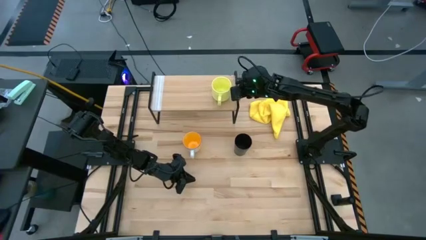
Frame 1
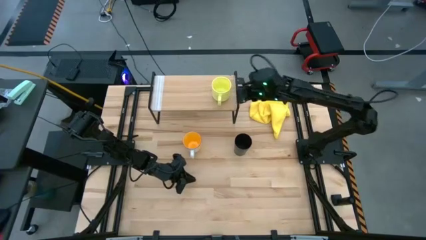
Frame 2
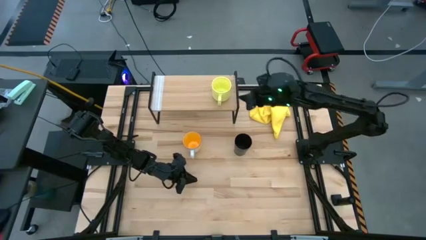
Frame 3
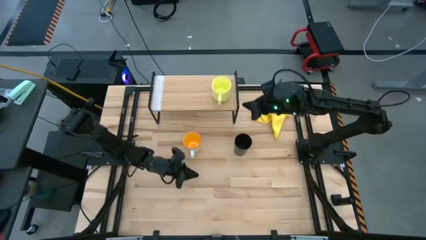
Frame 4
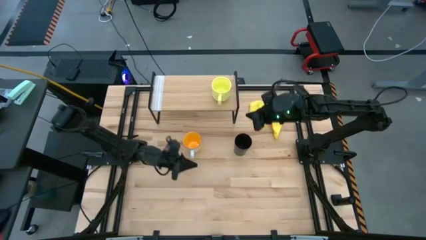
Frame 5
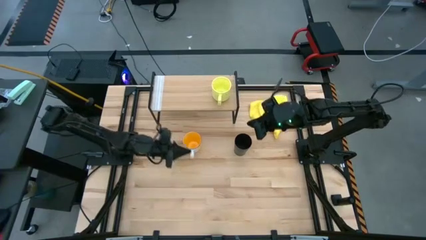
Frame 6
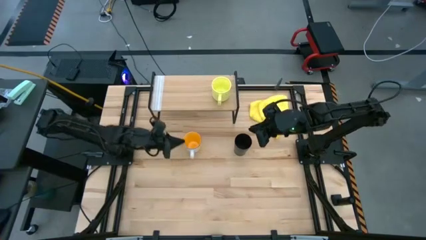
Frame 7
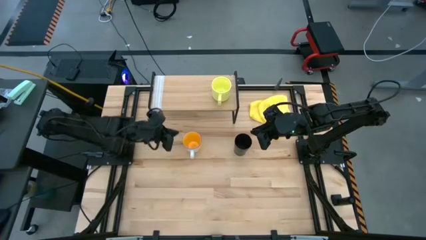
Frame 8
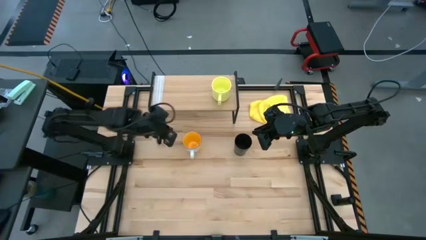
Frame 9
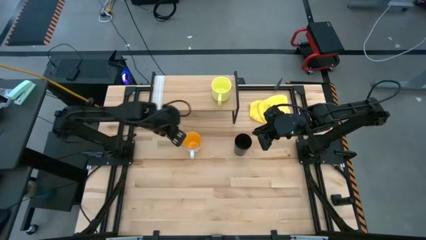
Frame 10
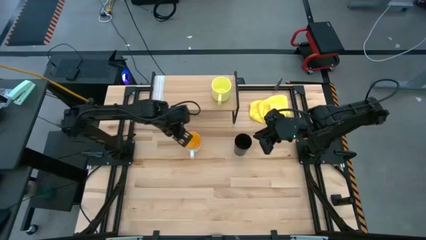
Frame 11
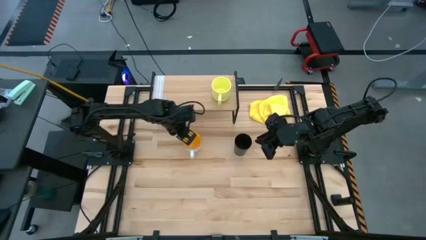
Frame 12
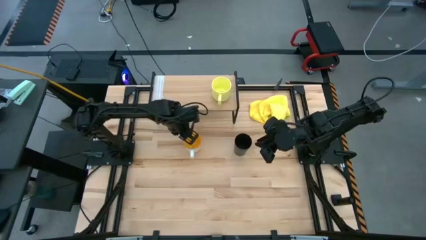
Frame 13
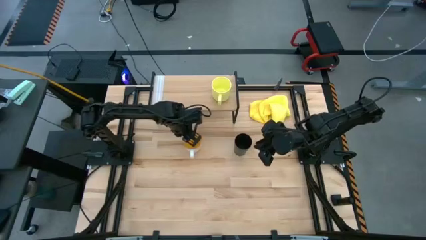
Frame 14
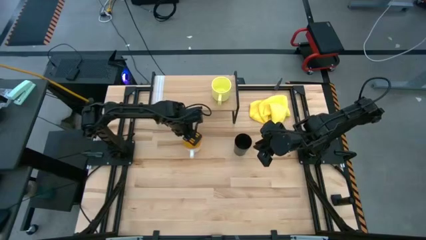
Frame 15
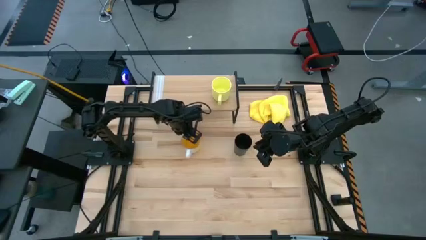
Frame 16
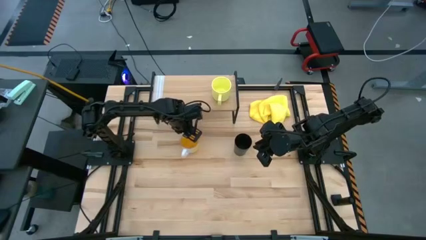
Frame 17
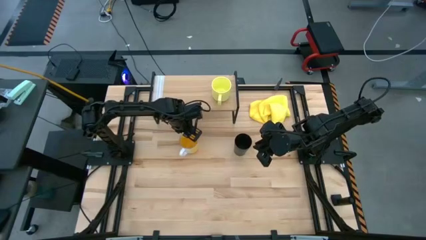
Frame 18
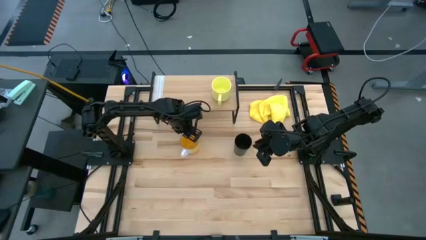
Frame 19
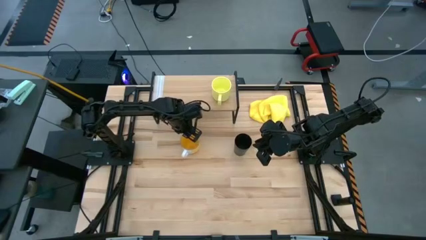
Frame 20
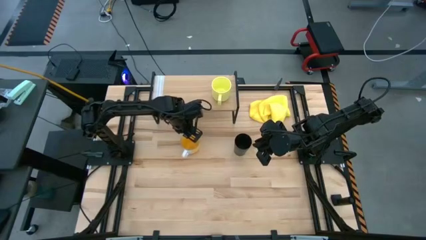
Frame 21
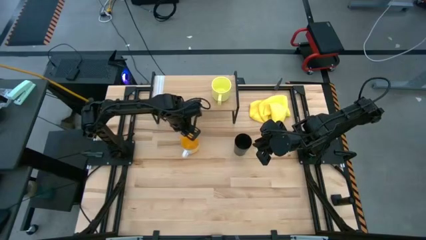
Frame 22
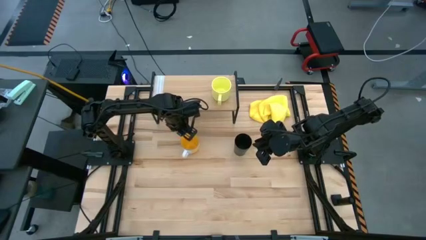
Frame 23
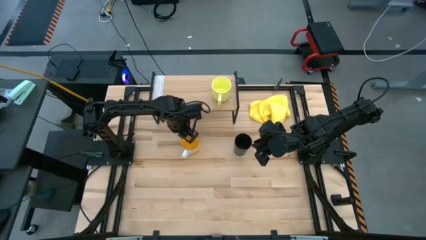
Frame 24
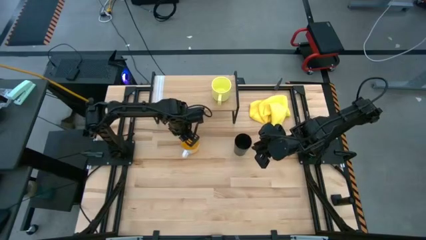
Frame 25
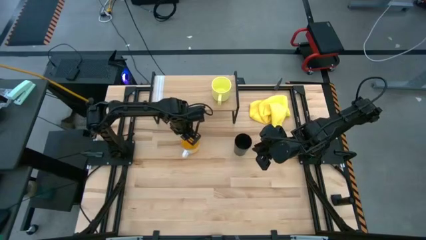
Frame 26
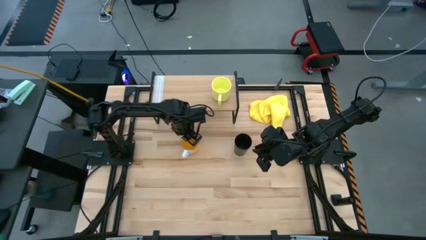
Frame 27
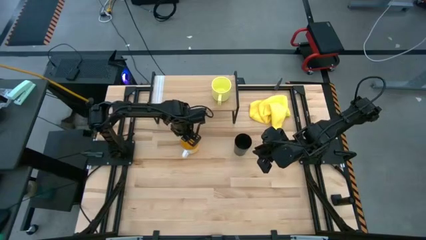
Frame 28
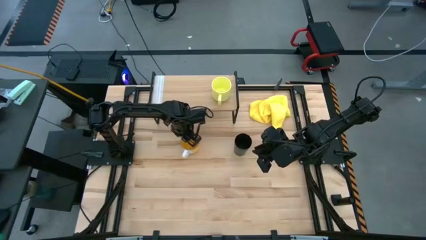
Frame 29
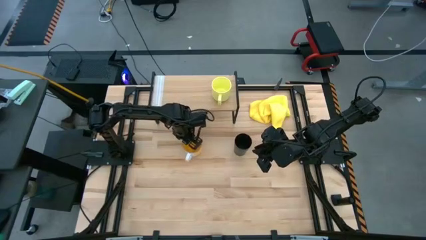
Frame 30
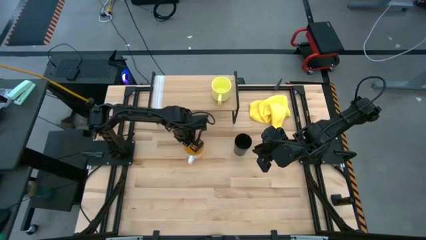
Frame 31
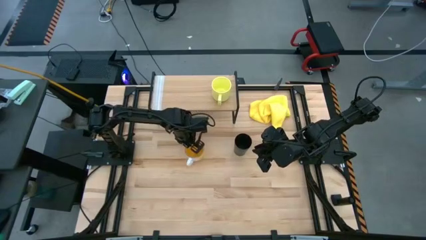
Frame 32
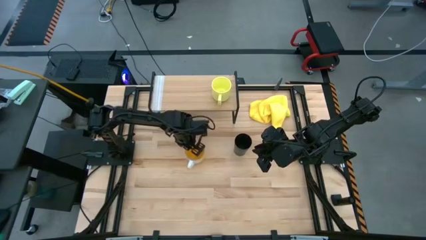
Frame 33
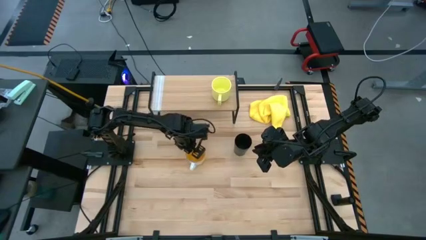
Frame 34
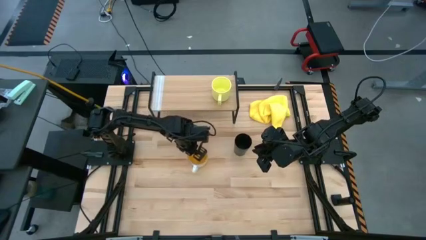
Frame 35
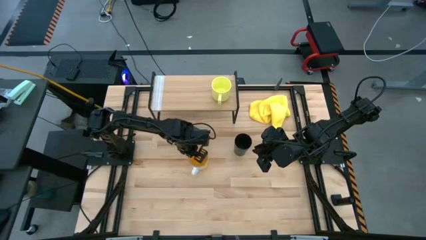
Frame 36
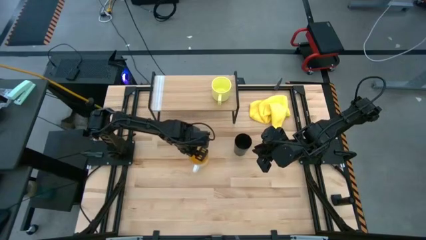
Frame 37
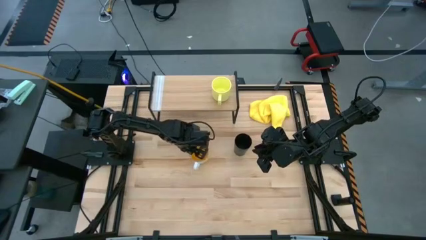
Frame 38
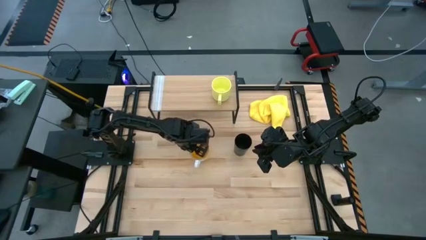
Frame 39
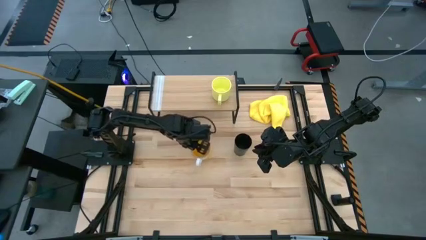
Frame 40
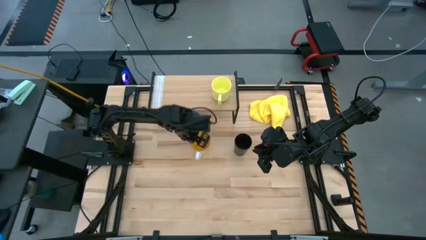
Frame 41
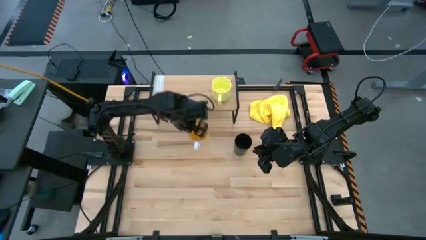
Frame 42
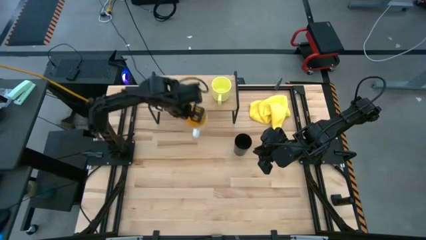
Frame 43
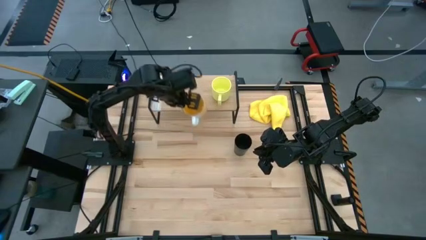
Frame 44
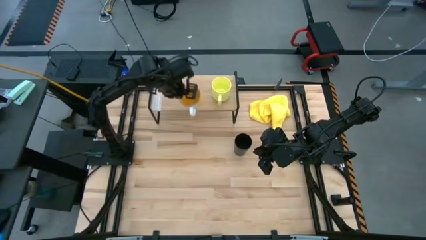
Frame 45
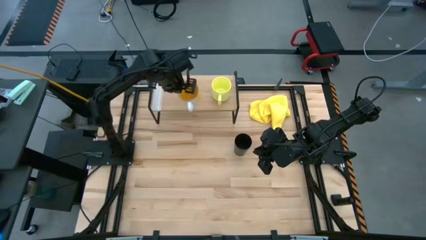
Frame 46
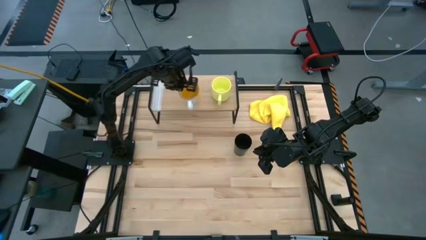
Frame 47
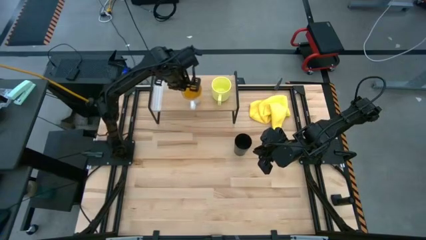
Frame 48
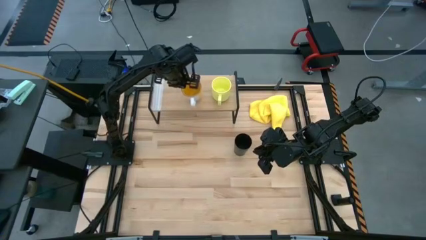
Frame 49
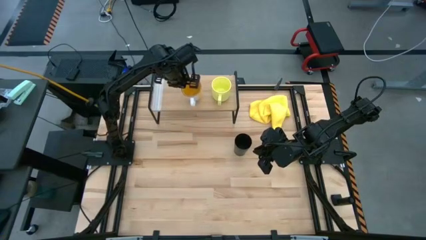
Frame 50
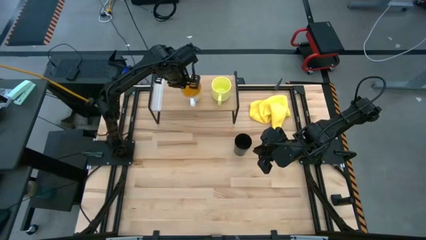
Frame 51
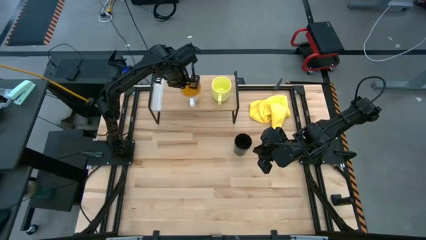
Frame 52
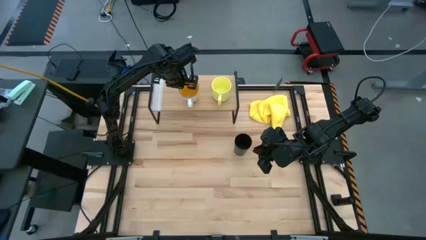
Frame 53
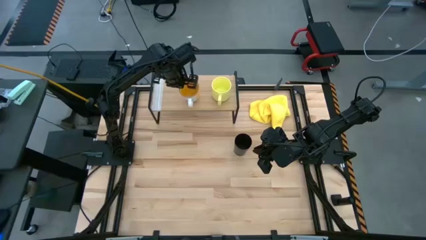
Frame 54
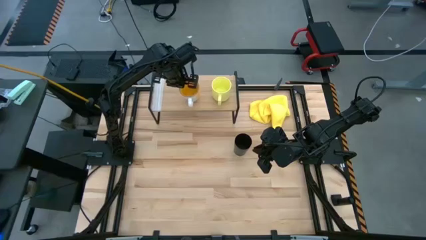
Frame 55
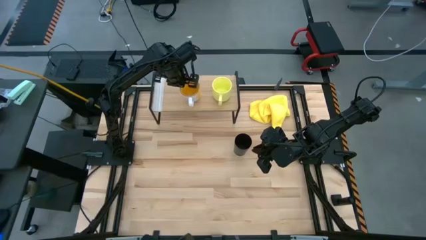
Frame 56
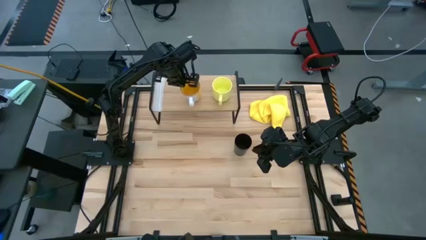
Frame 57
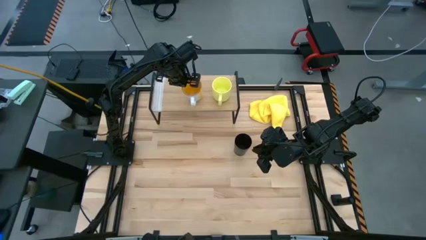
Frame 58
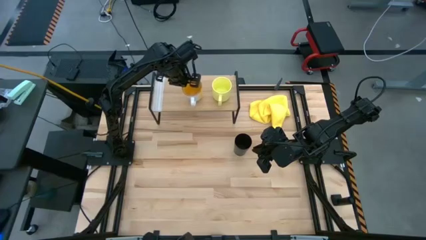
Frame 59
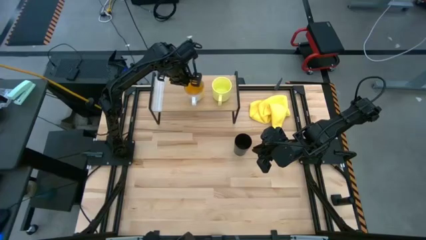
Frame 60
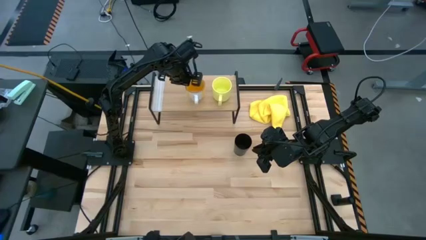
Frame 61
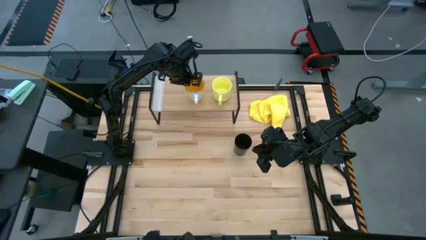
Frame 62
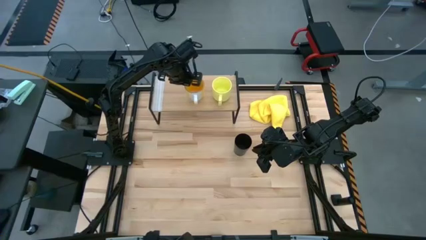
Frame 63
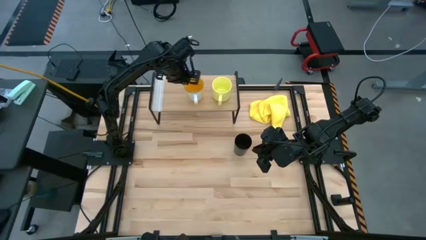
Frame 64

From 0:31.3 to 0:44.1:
Task: Stack small to large cups/mugs on shelf
Put the orange mug on the shelf
